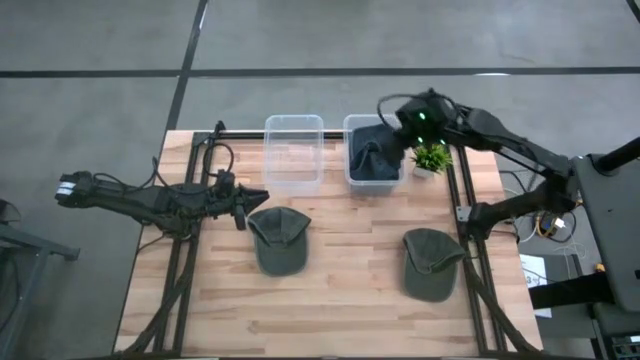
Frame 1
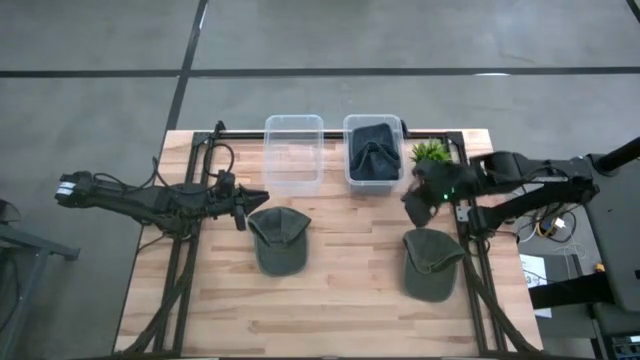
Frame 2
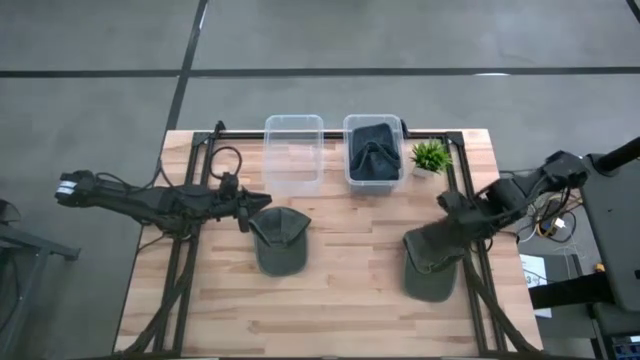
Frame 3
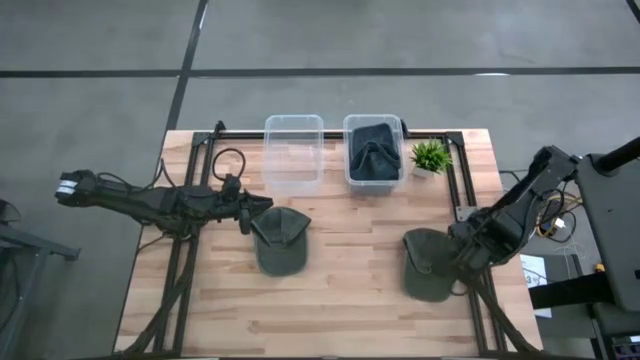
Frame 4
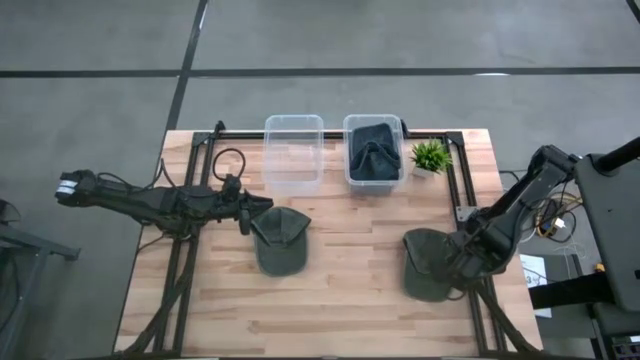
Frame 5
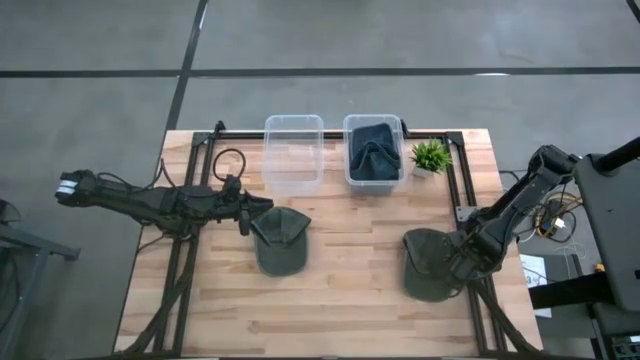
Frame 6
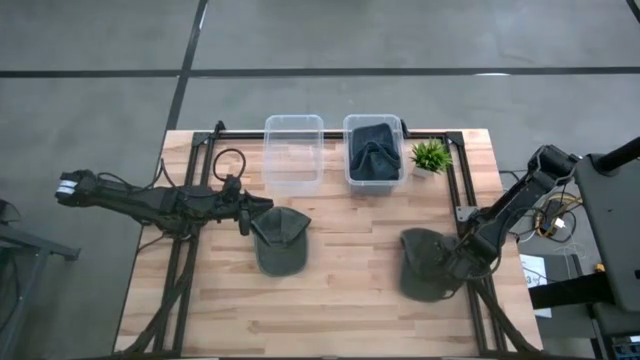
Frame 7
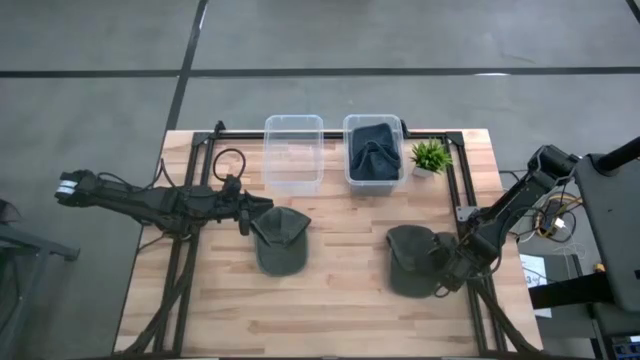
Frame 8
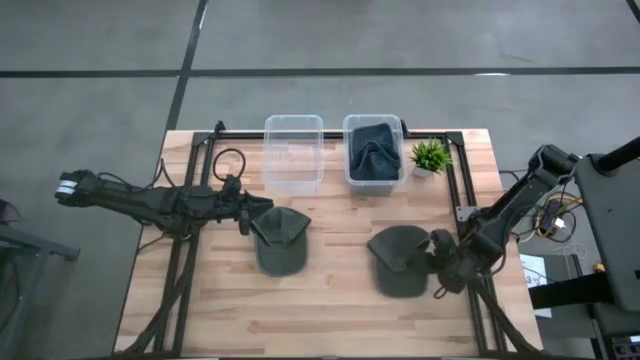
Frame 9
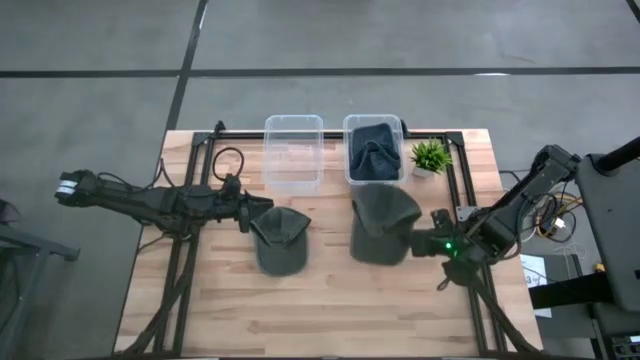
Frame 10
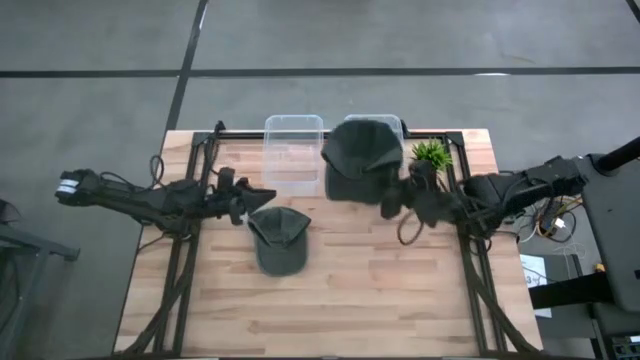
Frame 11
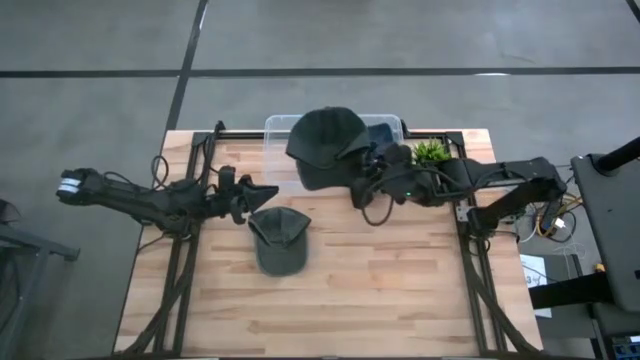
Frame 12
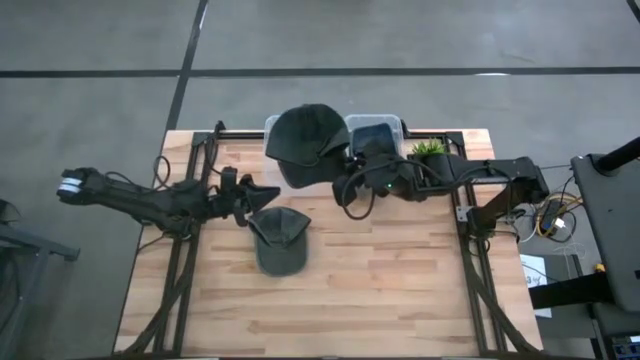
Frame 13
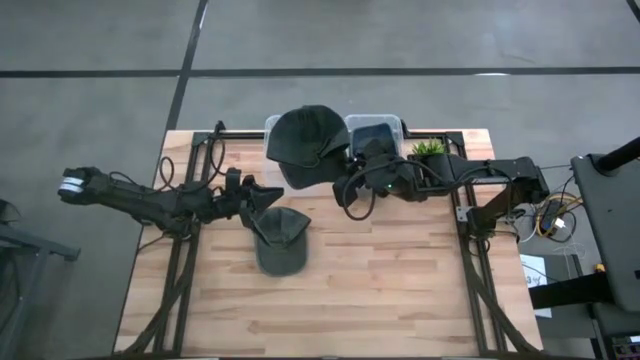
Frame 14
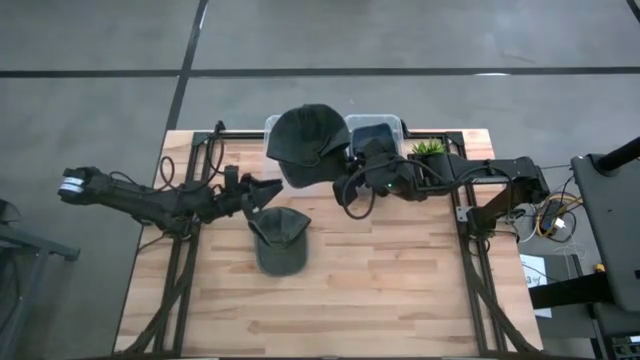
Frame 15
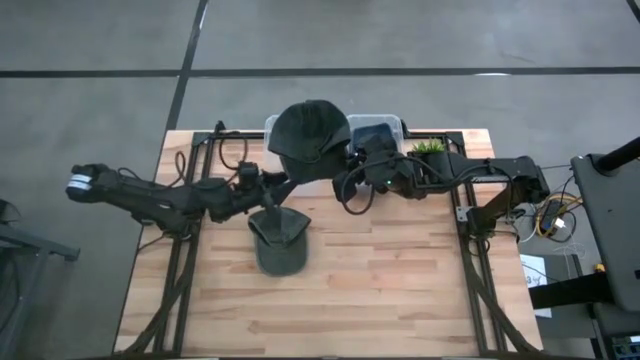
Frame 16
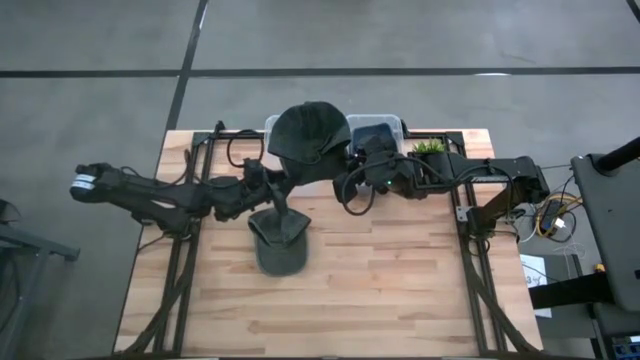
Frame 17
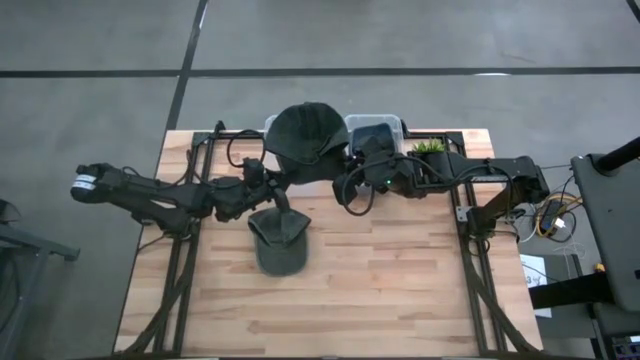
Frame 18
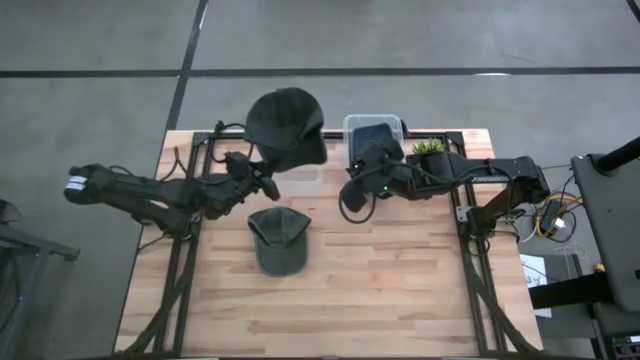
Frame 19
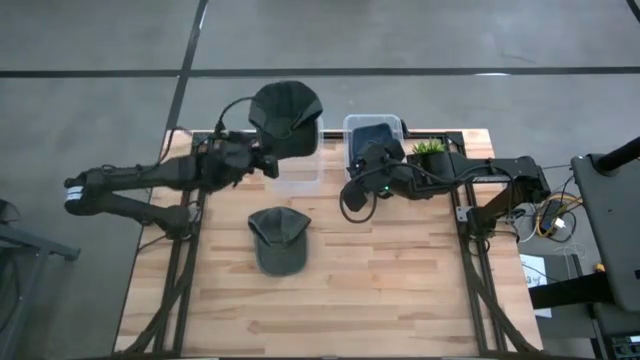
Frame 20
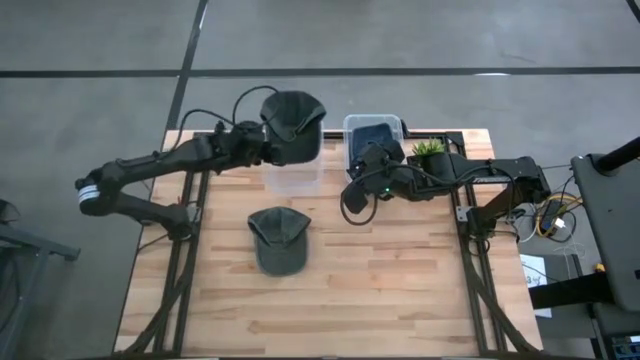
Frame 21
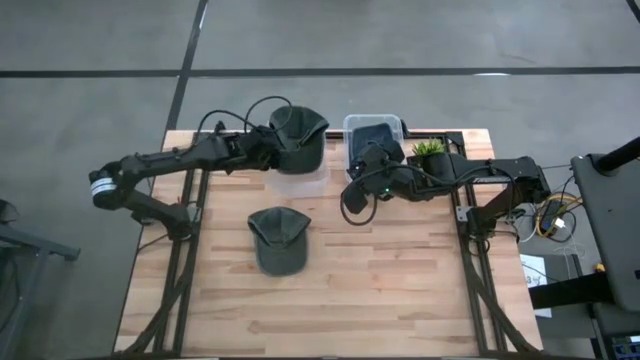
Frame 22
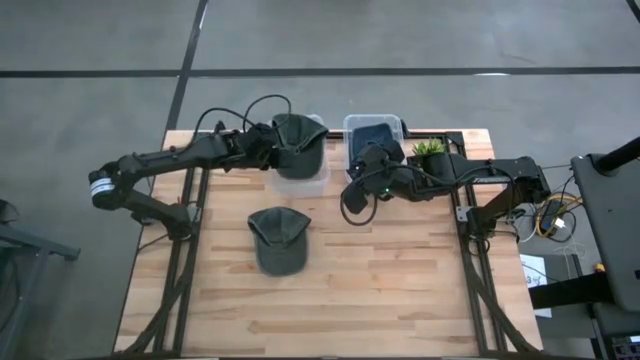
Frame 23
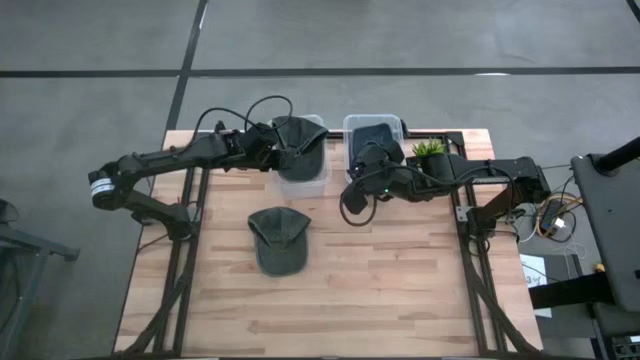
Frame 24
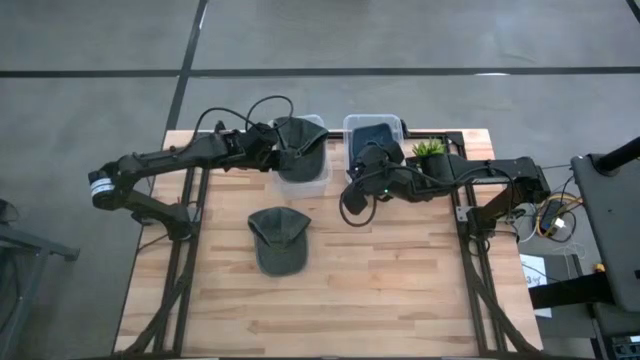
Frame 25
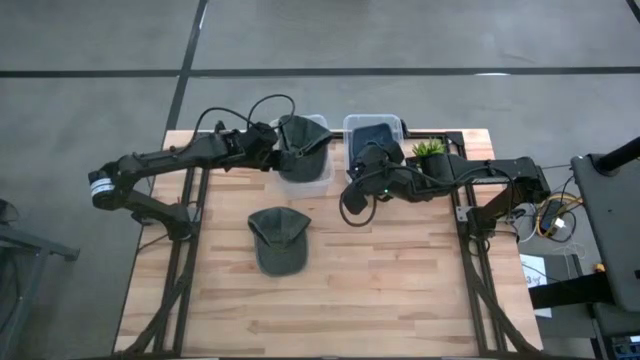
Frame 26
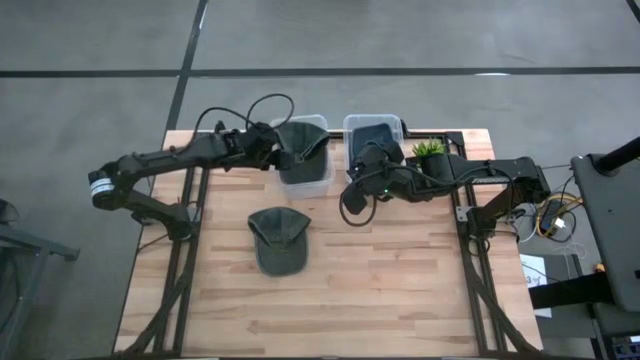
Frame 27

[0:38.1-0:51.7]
Task: Pick & Place hat
Put the right gray cap into the left transparent bin

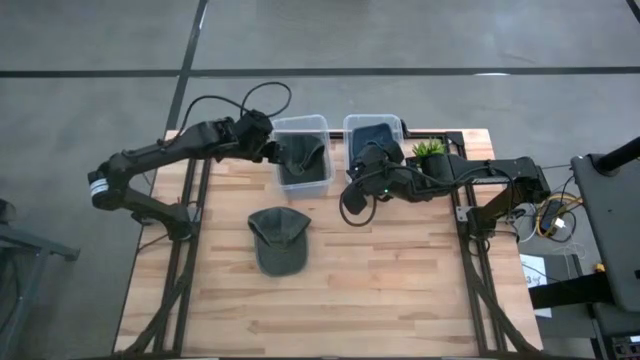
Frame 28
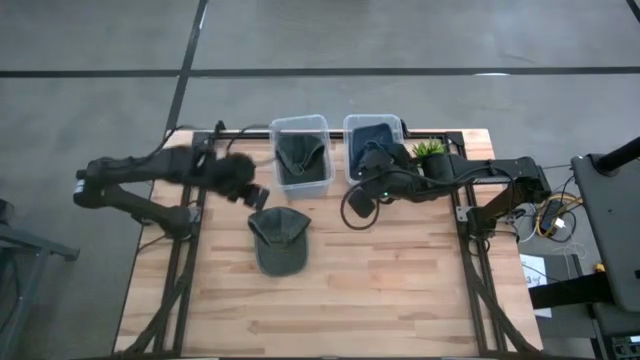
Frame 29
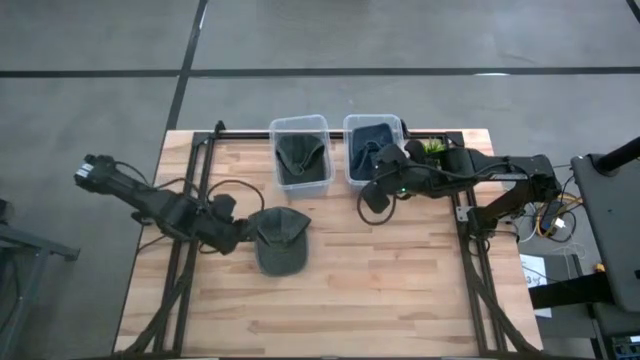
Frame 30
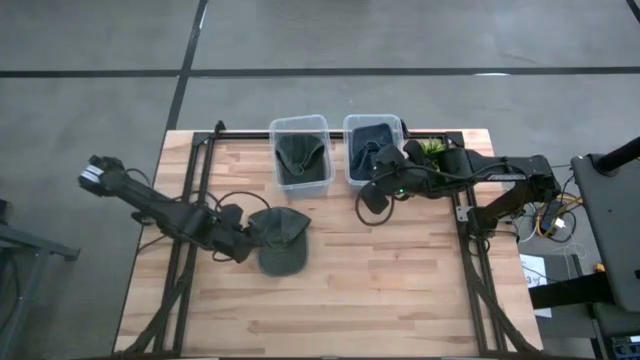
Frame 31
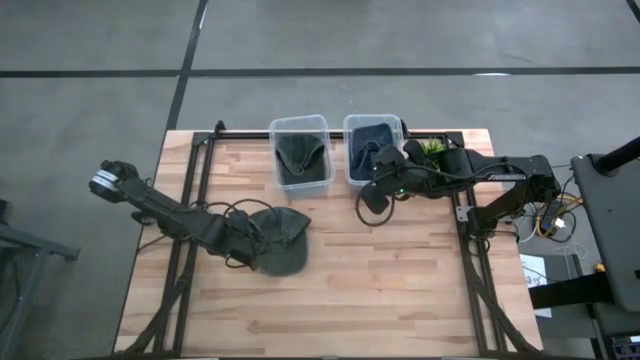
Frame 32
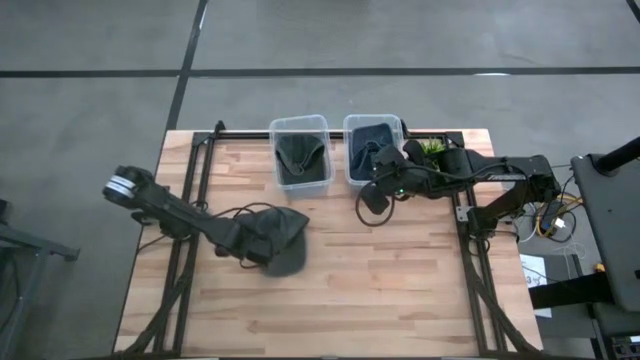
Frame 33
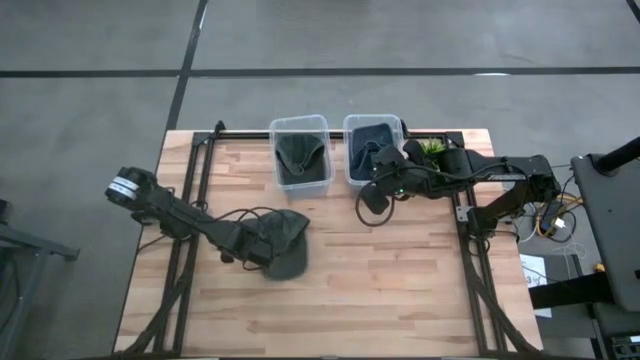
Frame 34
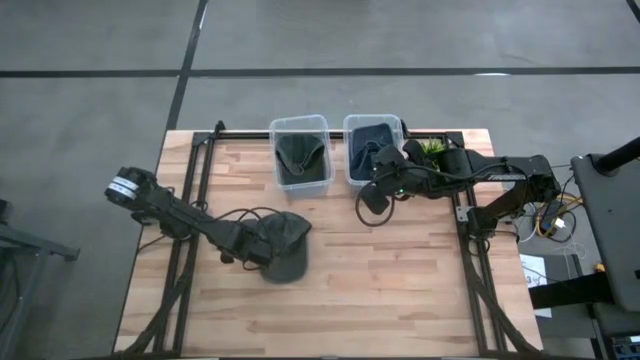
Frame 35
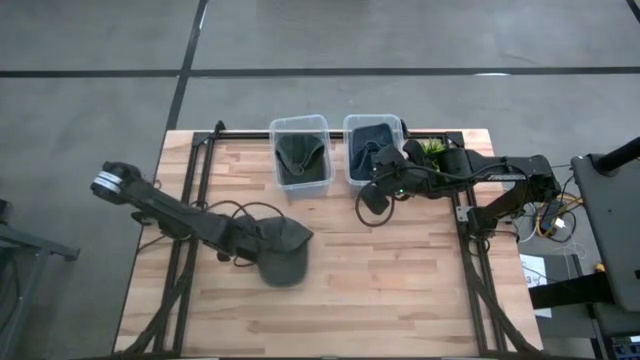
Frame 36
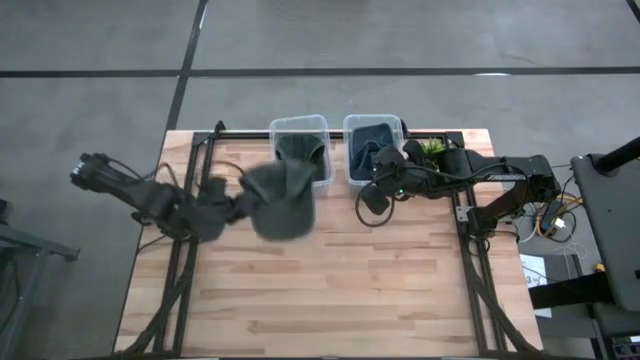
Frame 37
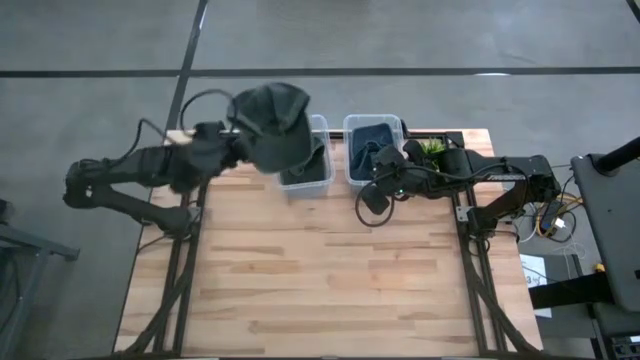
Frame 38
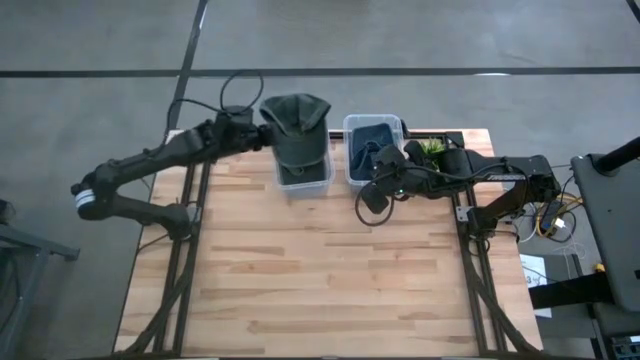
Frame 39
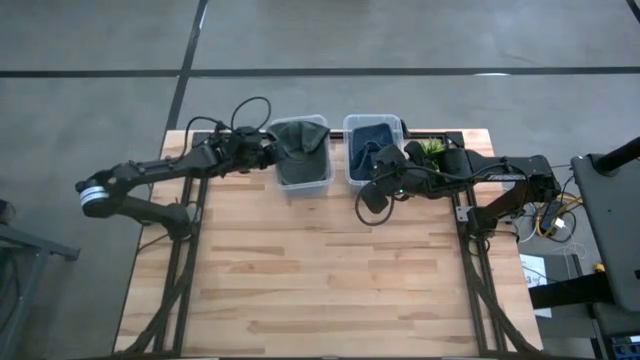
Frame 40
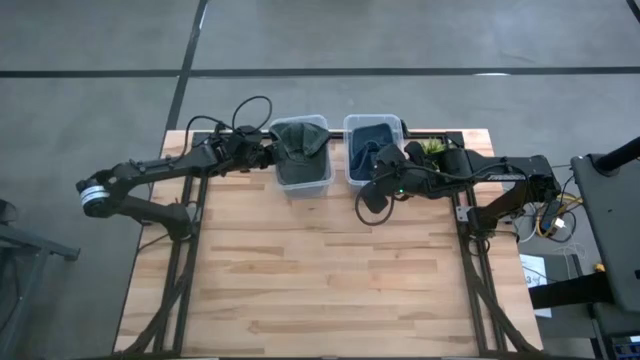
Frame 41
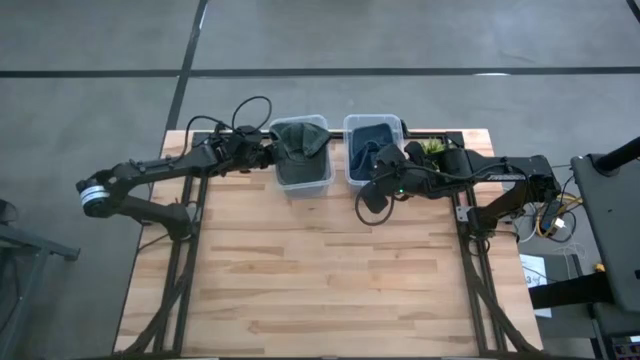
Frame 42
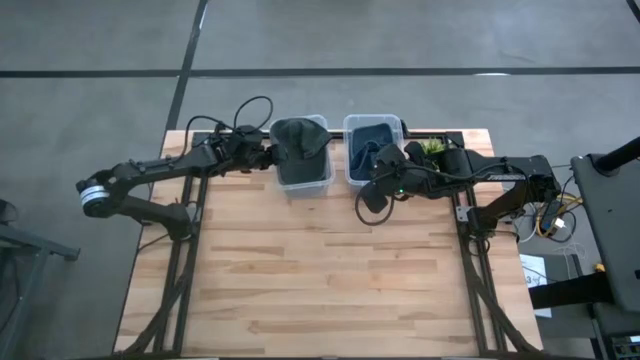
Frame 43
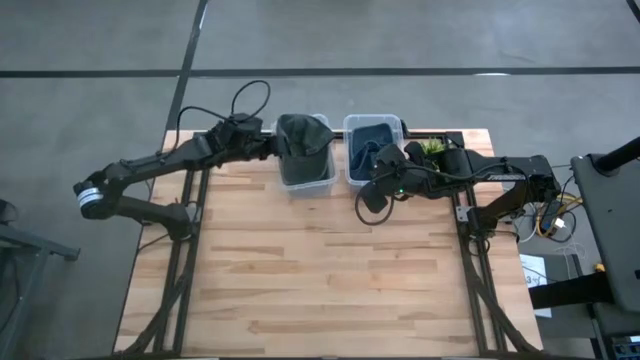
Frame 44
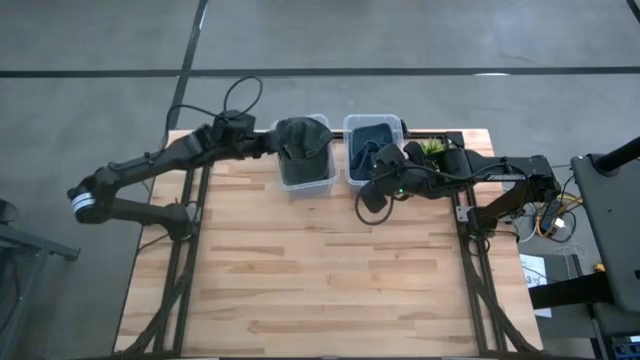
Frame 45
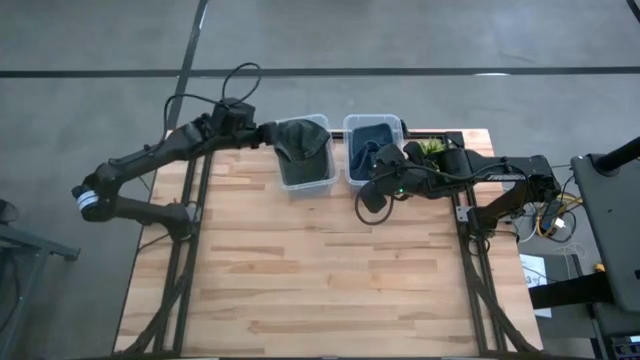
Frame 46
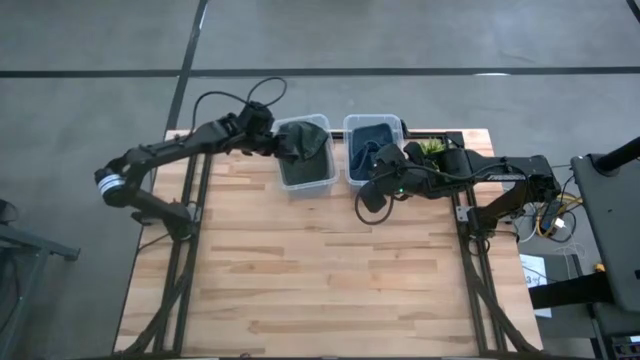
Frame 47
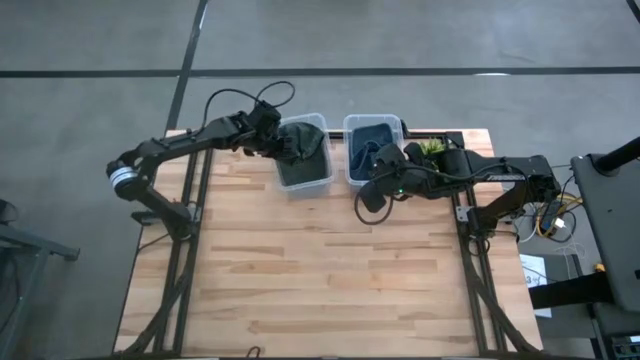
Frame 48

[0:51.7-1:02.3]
Put the gray cap into the left transparent bin
